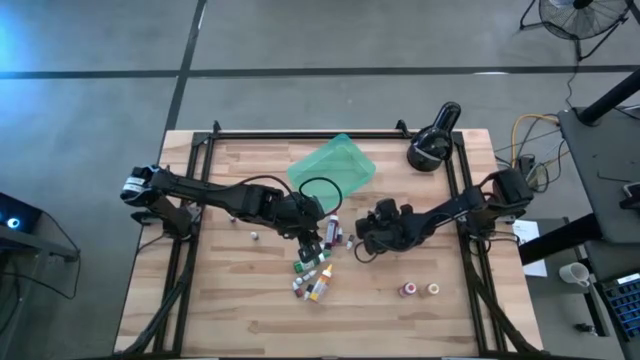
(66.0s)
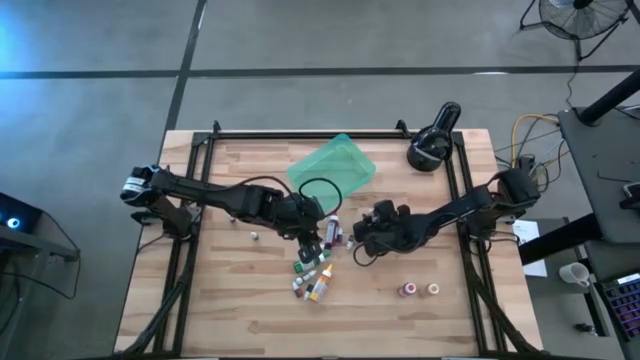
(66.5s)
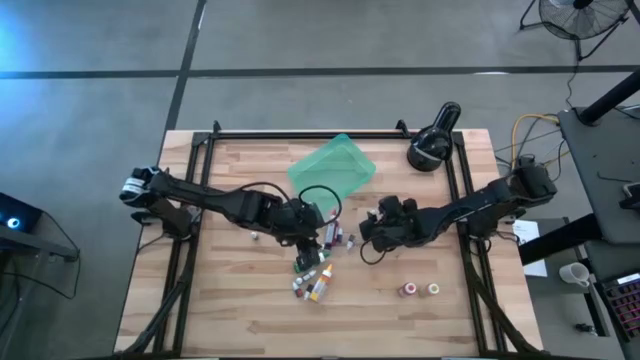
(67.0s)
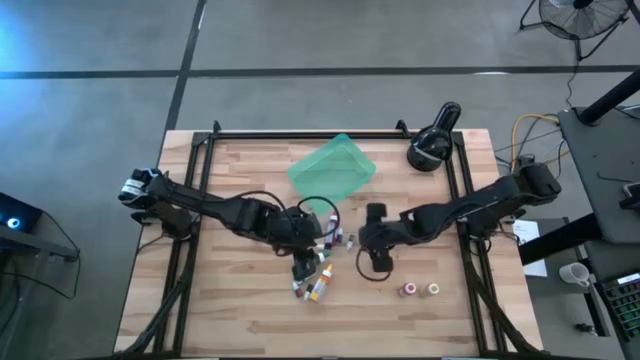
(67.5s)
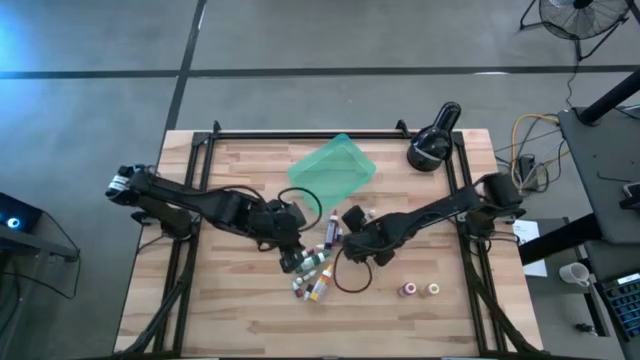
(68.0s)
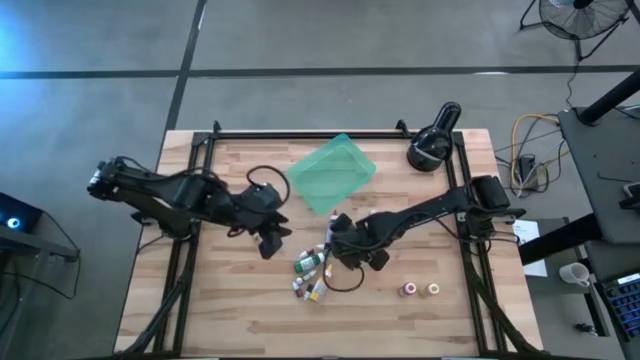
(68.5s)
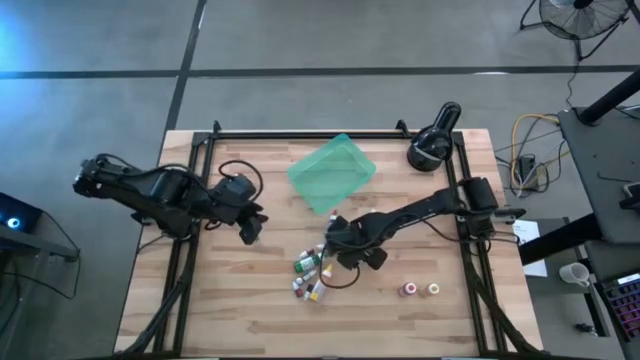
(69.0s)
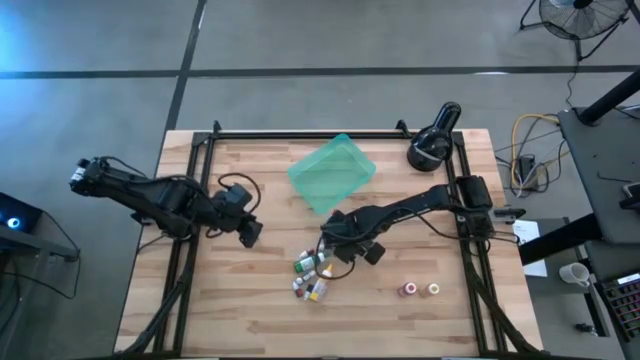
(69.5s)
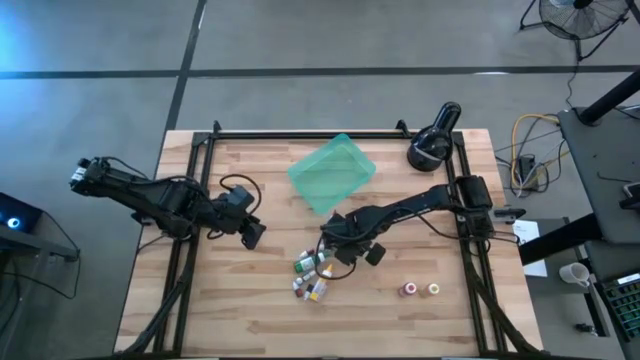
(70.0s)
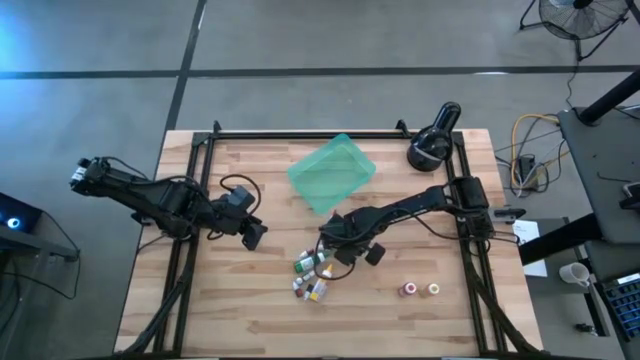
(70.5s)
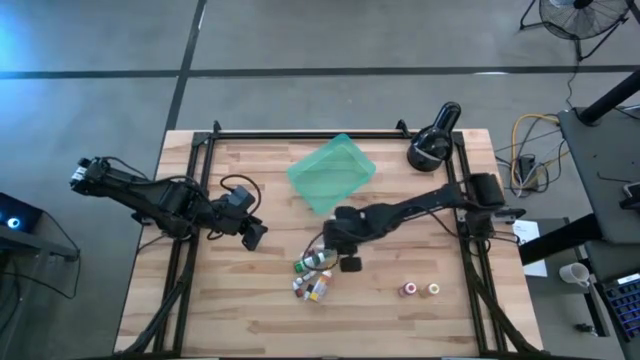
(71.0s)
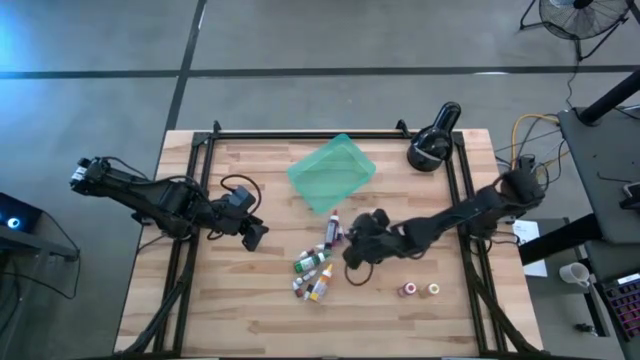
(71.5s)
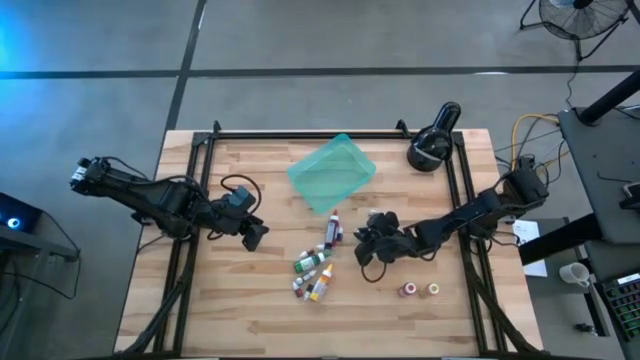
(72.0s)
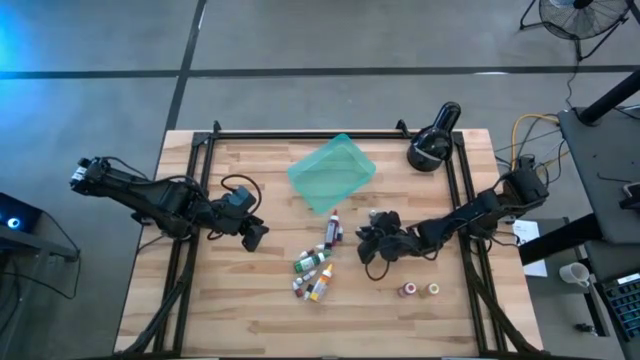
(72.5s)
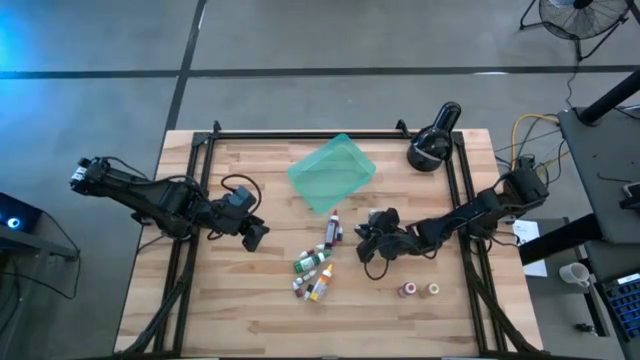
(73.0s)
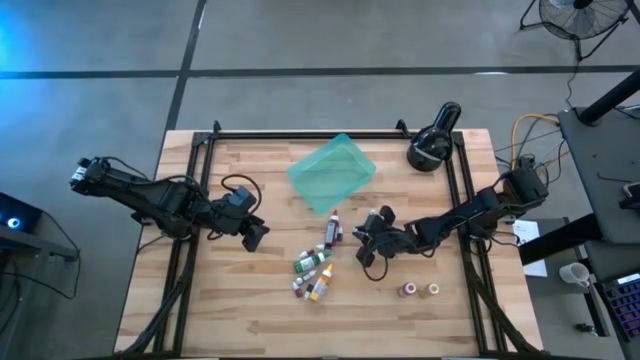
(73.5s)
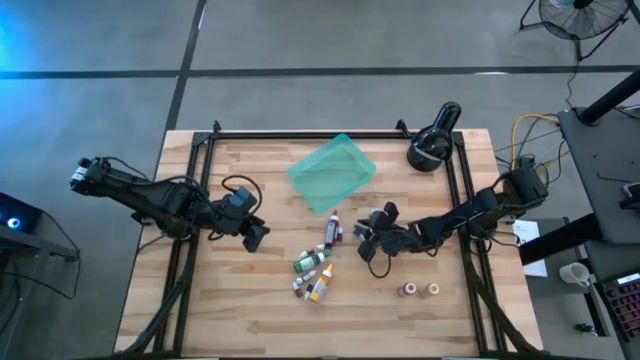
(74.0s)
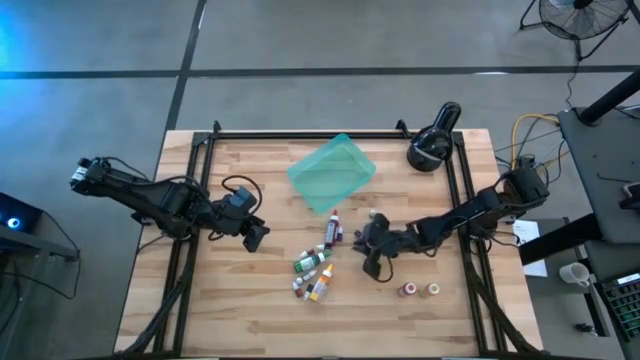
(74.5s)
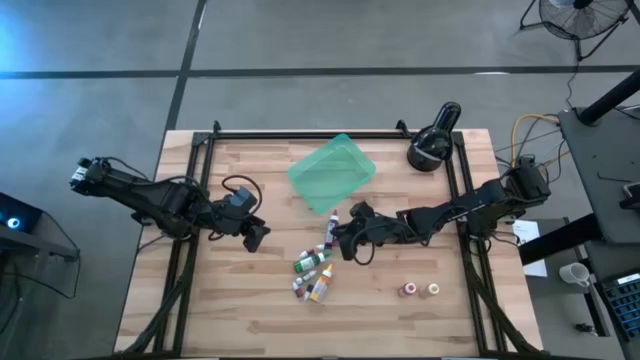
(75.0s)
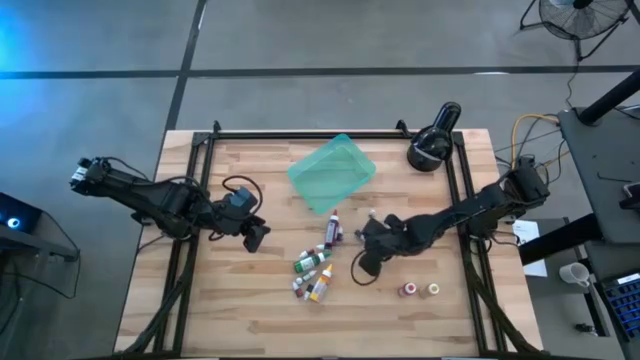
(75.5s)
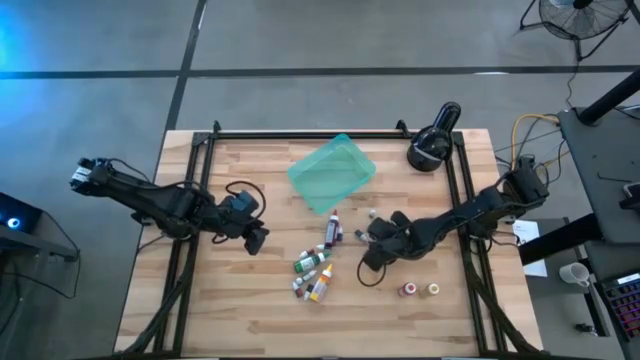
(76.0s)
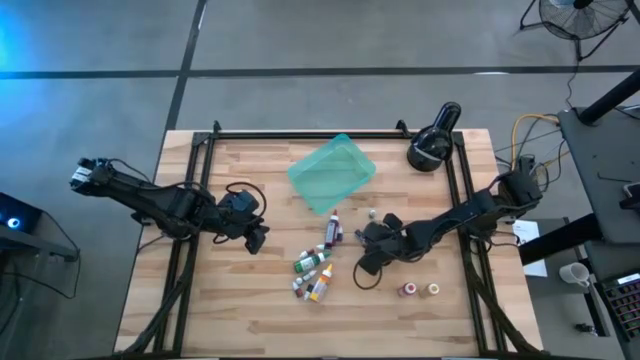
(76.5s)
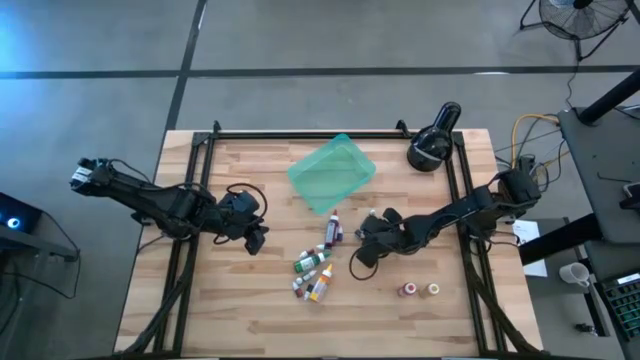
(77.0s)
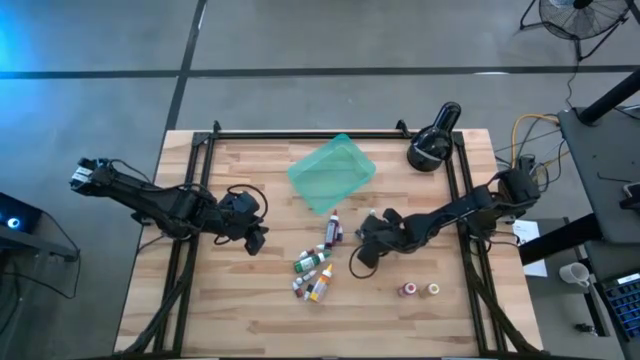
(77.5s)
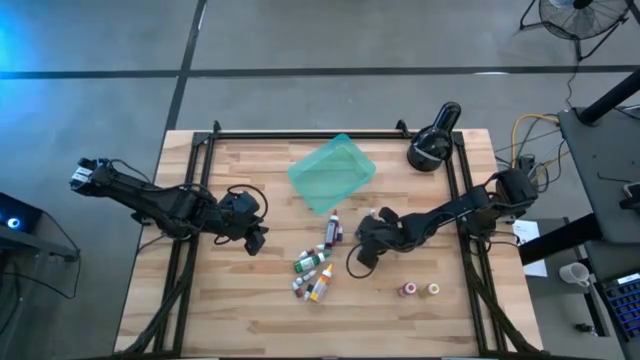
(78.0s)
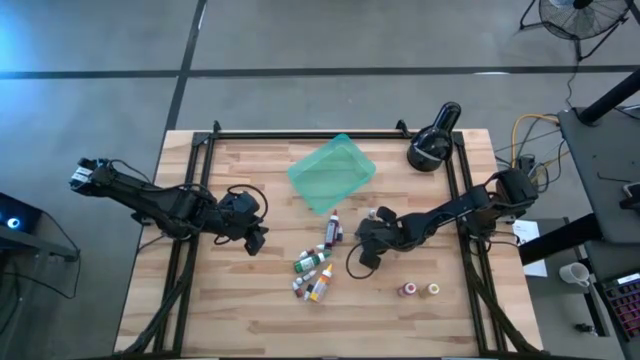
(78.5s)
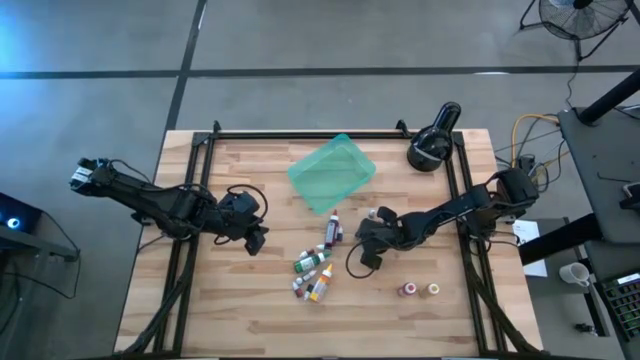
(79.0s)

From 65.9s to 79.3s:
Task: Pick & Place food coloring
Adjust the blue small food coloring bottle

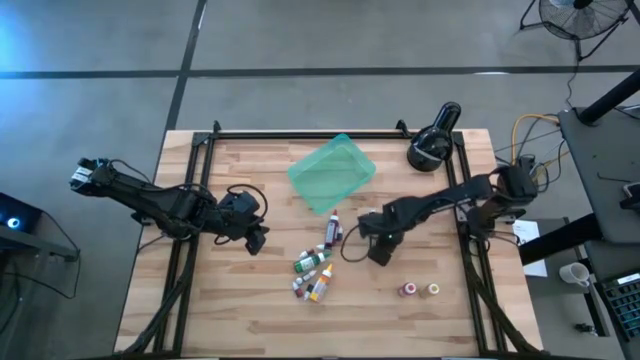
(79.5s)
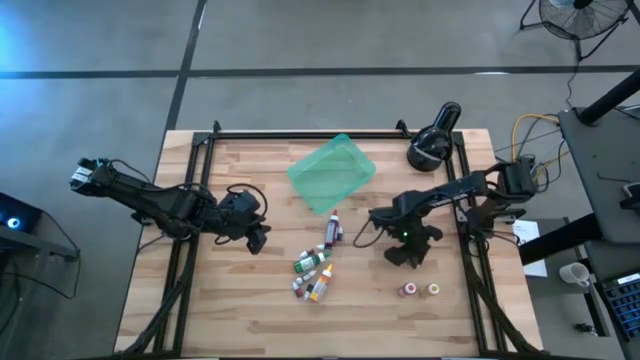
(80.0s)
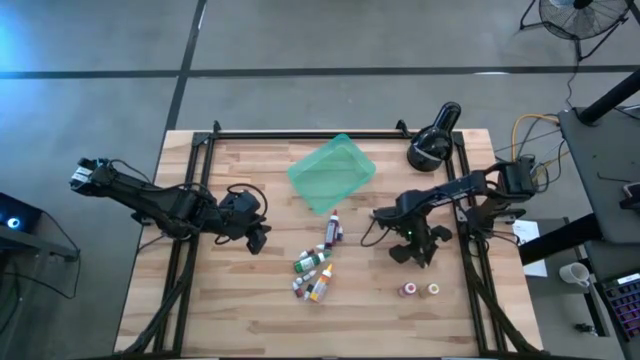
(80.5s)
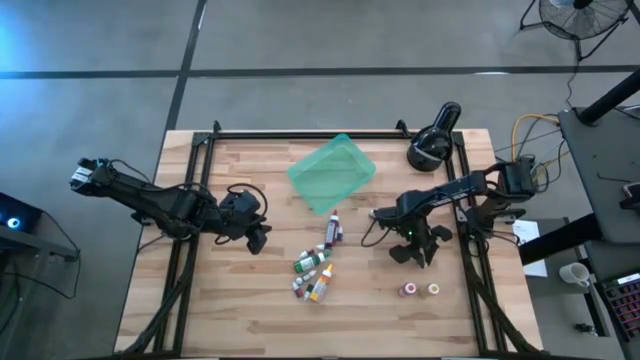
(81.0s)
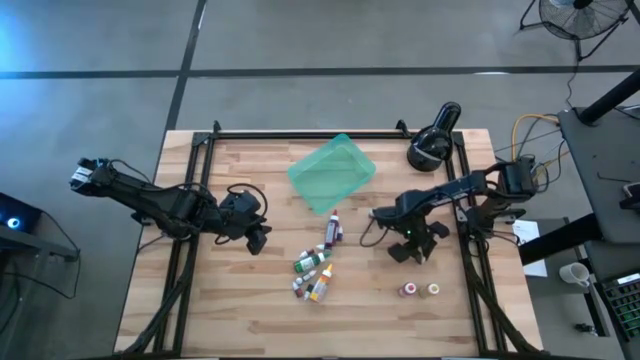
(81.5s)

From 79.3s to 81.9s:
Adjust the blue small food coloring bottle

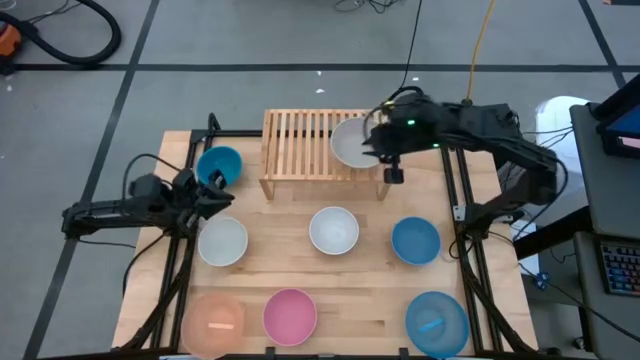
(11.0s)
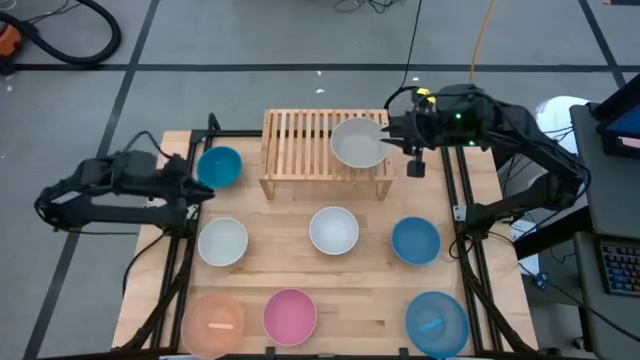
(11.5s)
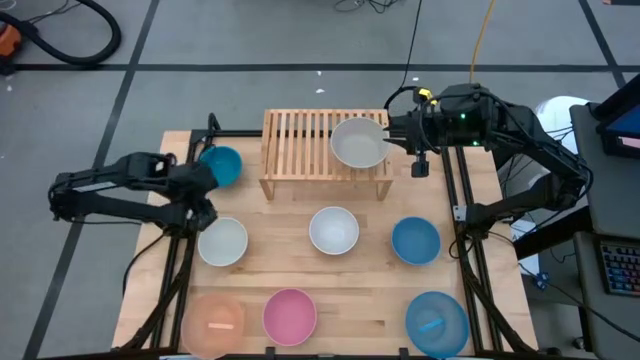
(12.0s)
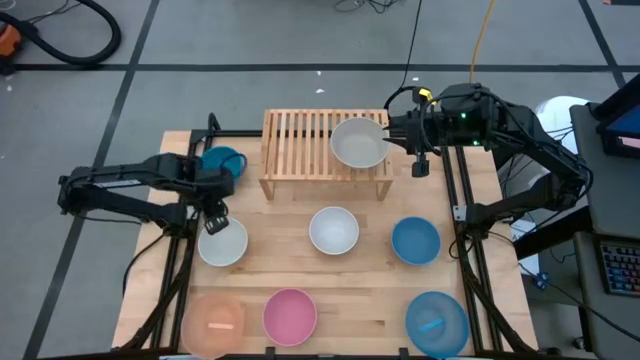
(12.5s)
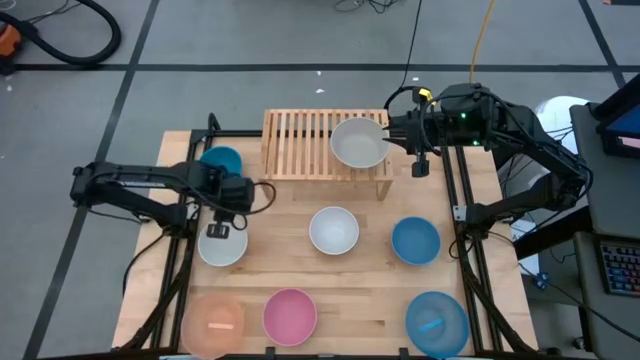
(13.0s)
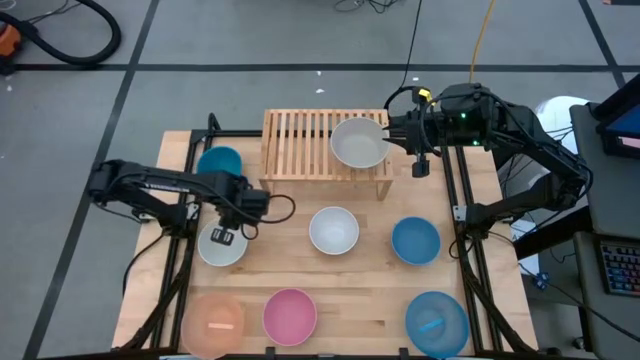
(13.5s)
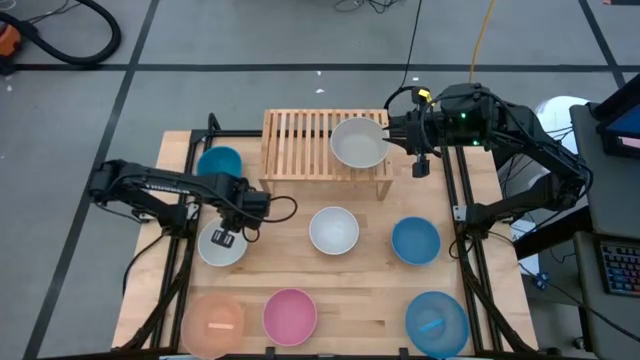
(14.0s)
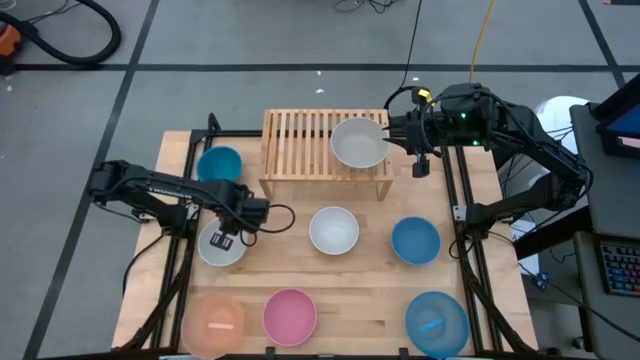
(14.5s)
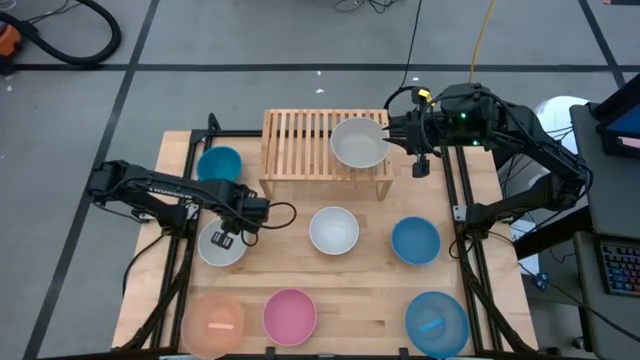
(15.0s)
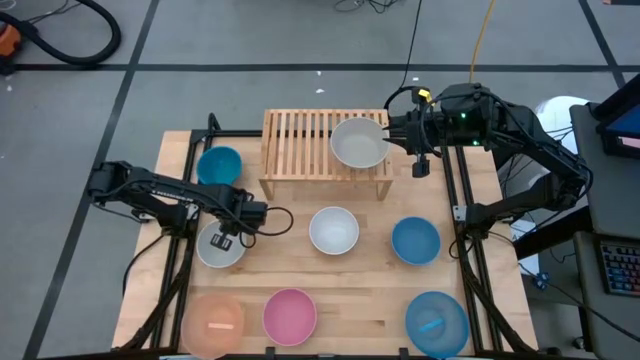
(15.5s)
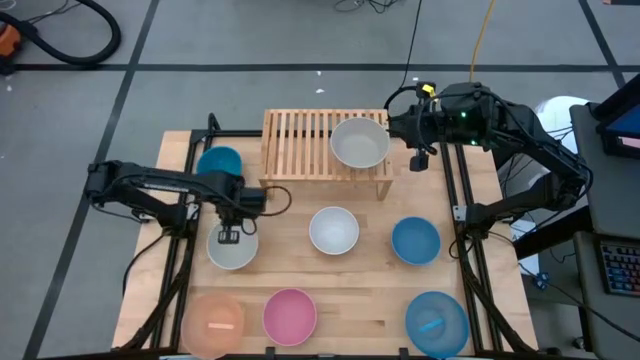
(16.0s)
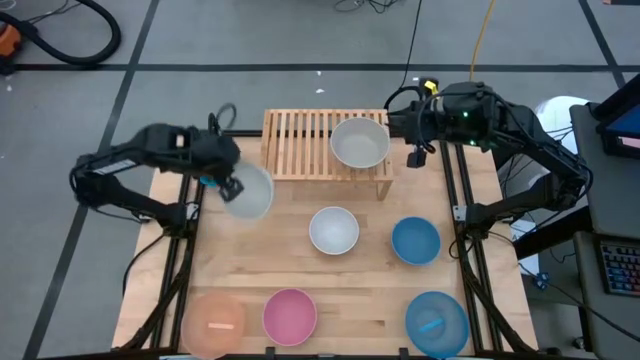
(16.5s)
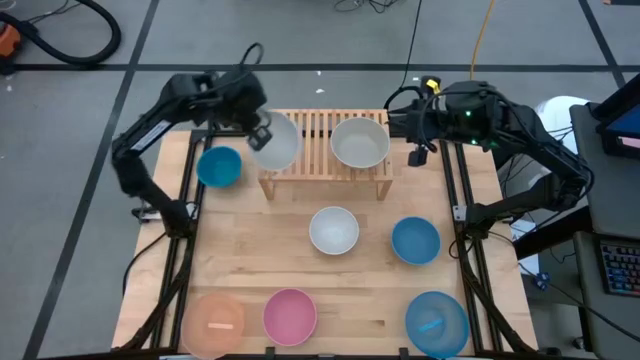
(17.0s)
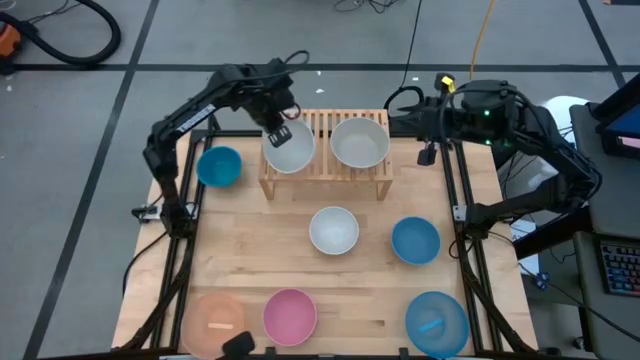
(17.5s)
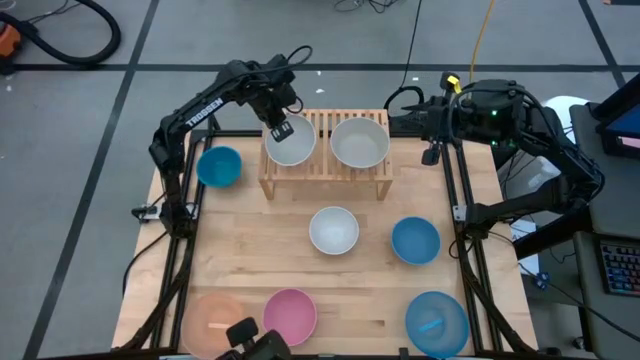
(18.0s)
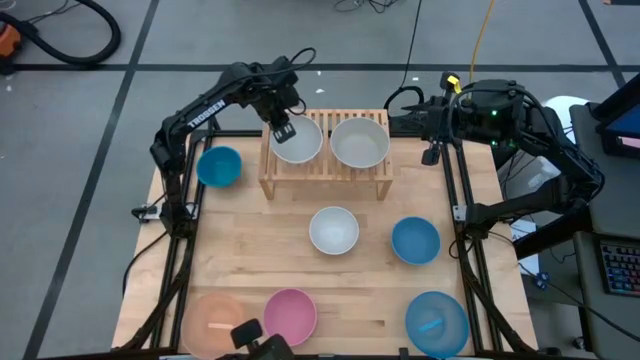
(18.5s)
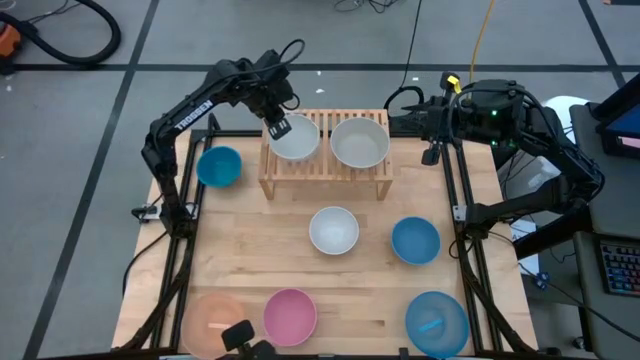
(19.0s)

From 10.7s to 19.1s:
Task: Place and stack bowls onto a shelf
Put the small left white bowl on the shelf
